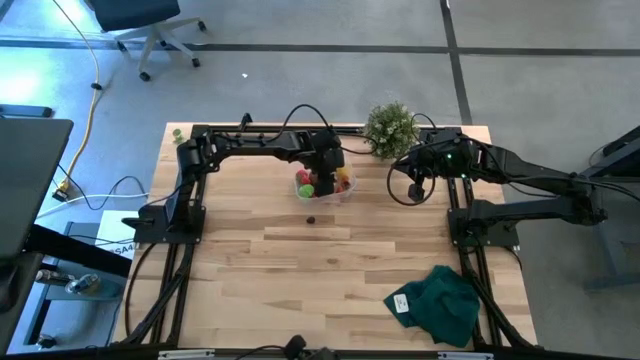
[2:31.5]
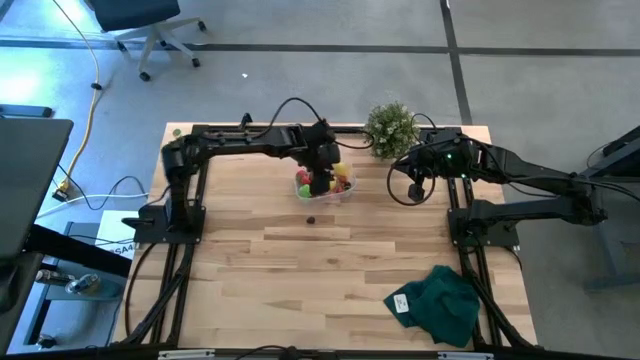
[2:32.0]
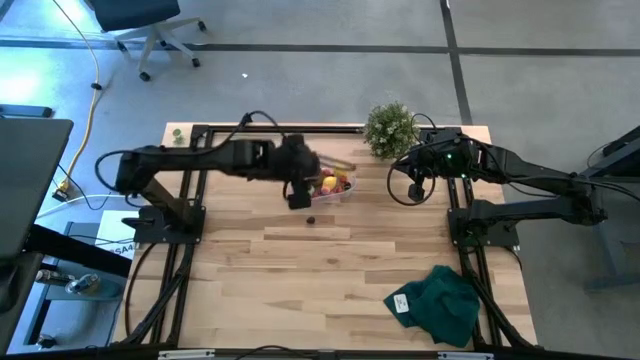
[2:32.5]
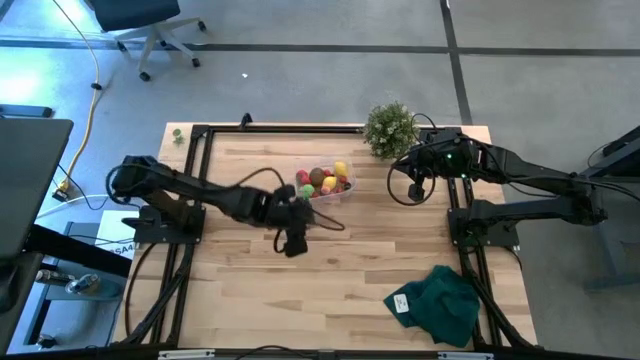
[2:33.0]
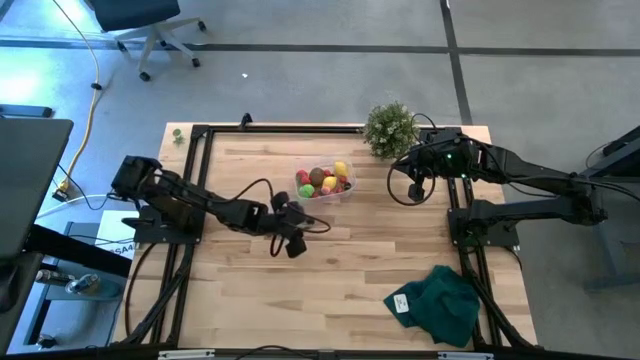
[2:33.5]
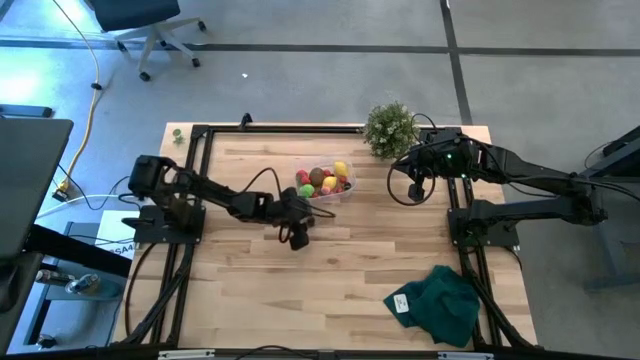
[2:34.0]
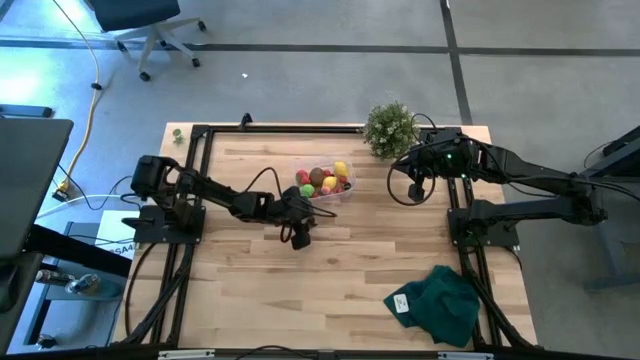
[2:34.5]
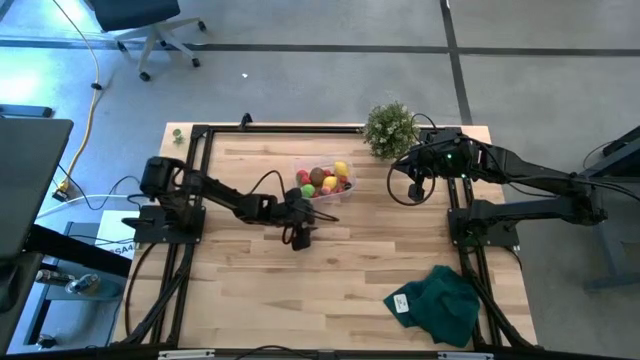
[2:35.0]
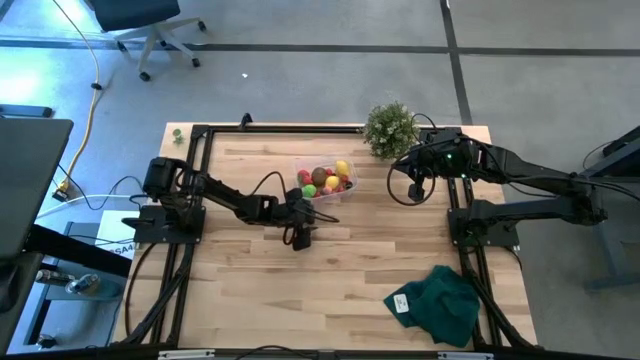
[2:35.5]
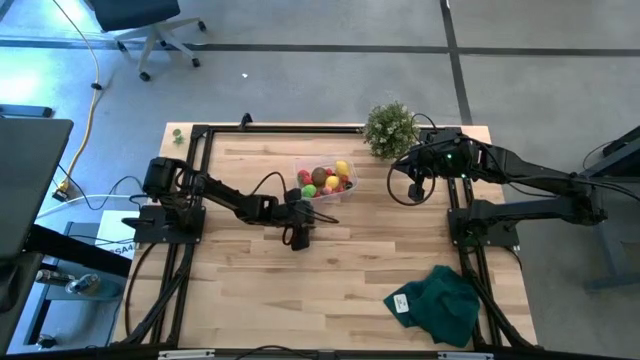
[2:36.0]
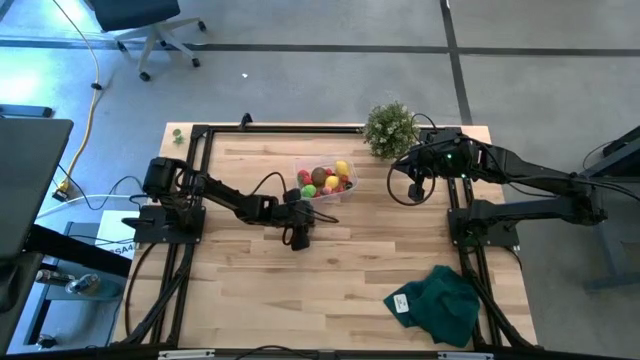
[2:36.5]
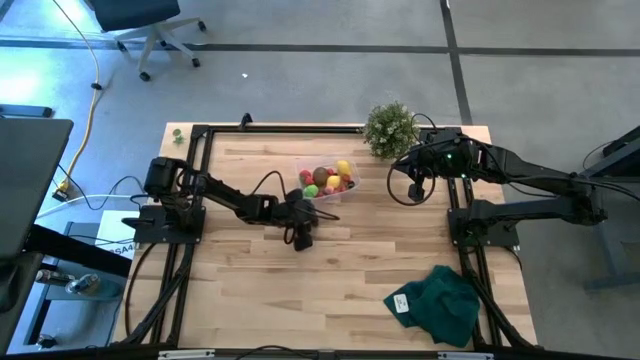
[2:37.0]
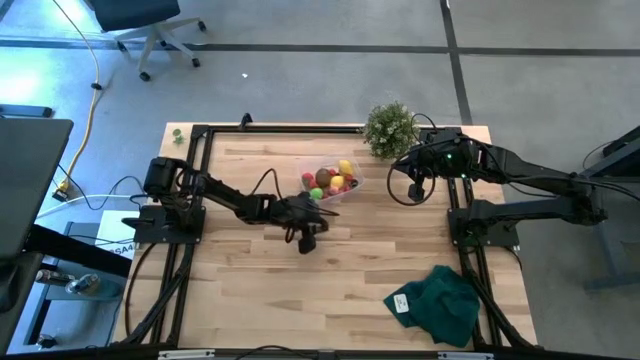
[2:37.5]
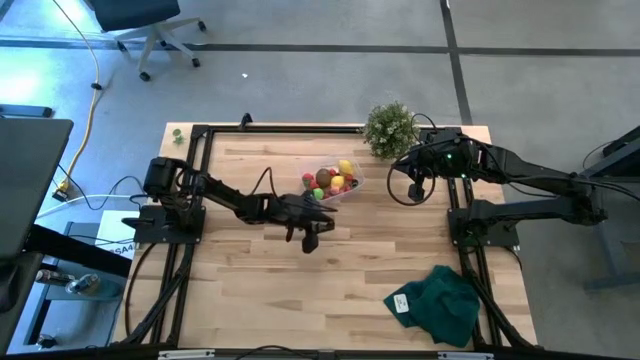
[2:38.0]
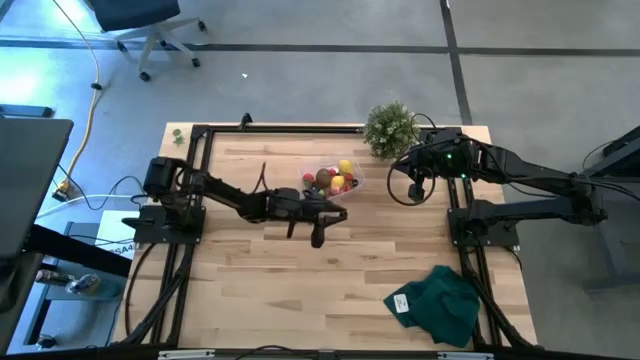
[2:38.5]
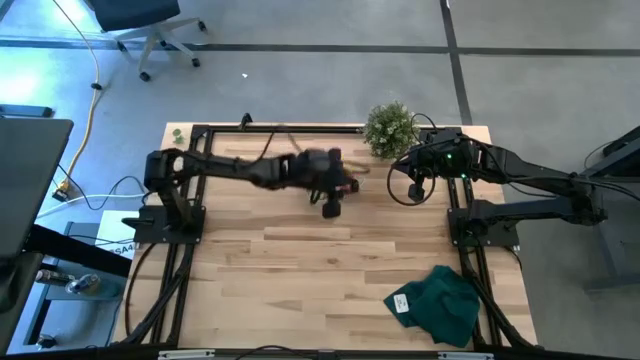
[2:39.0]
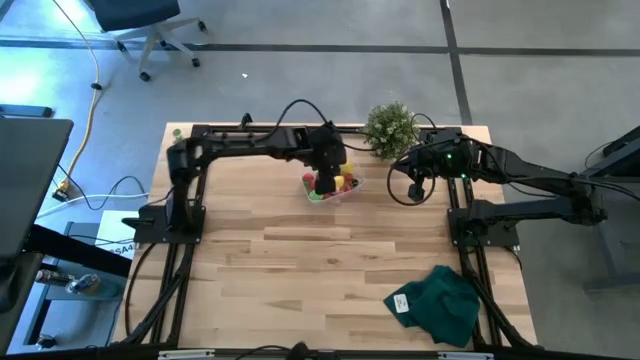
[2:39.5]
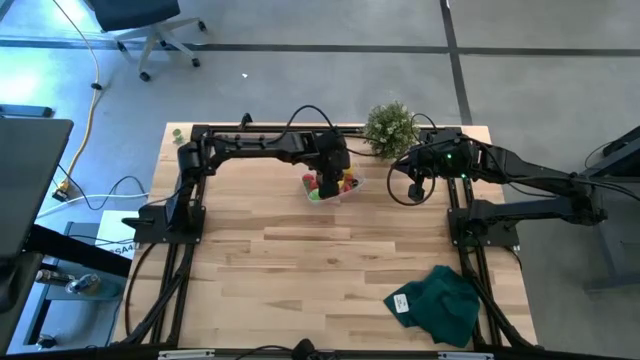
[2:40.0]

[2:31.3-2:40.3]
Task: Pick and placing Produce into tupperware
Put the blackberry into the transparent bin

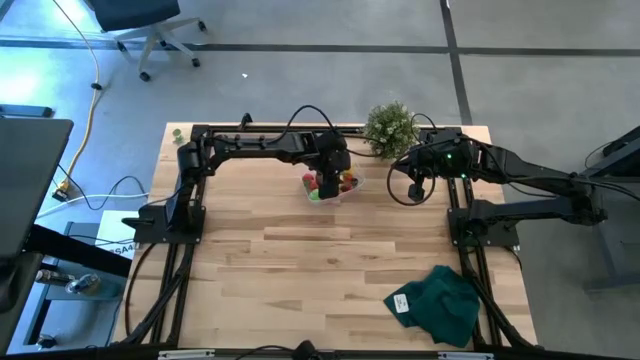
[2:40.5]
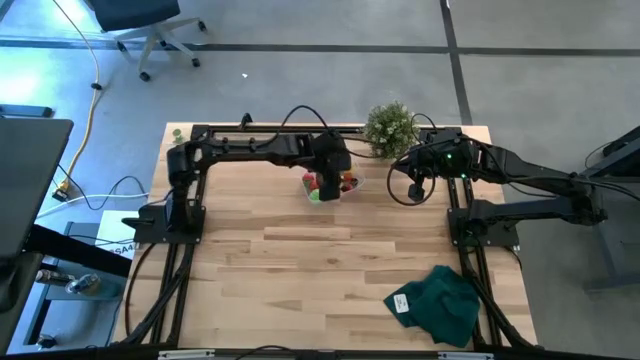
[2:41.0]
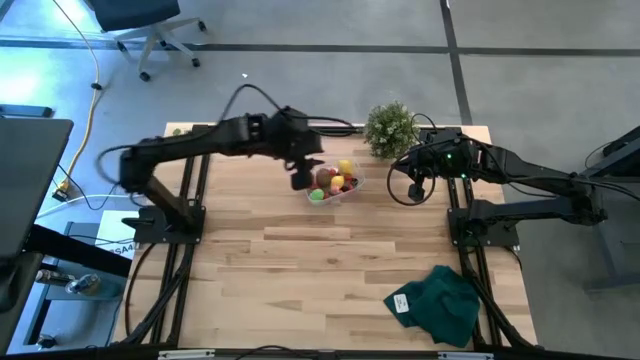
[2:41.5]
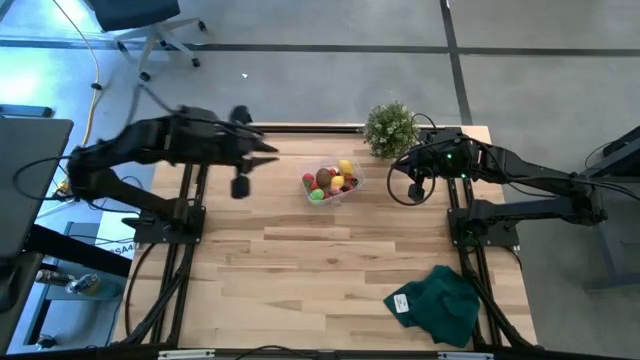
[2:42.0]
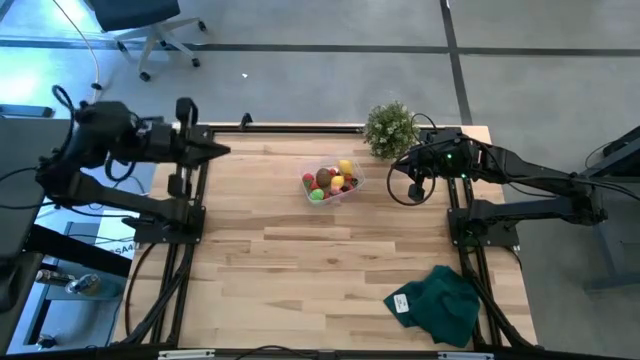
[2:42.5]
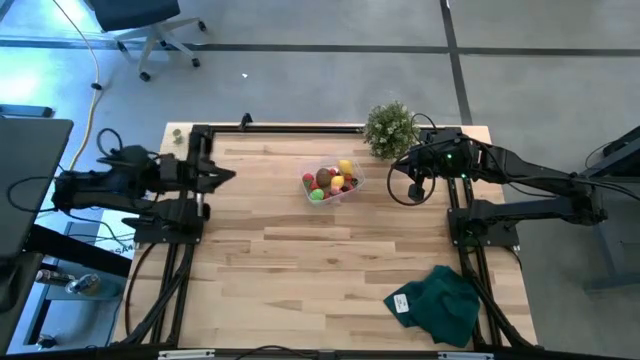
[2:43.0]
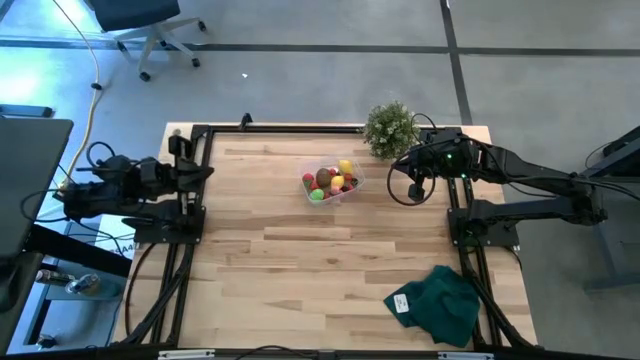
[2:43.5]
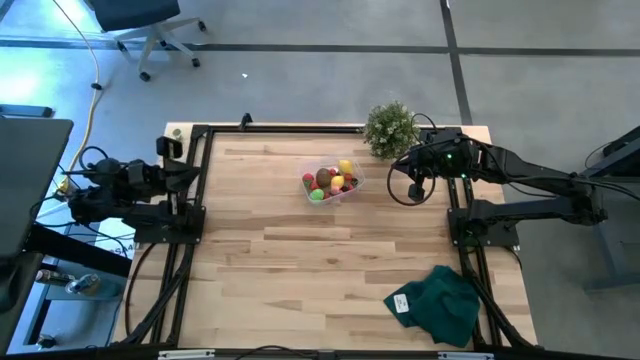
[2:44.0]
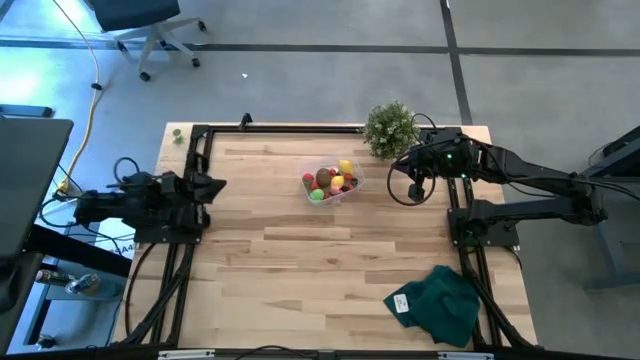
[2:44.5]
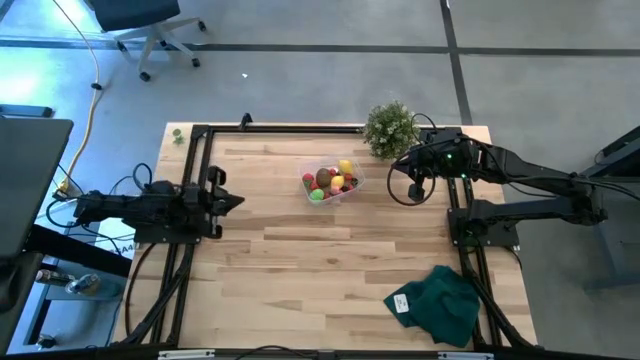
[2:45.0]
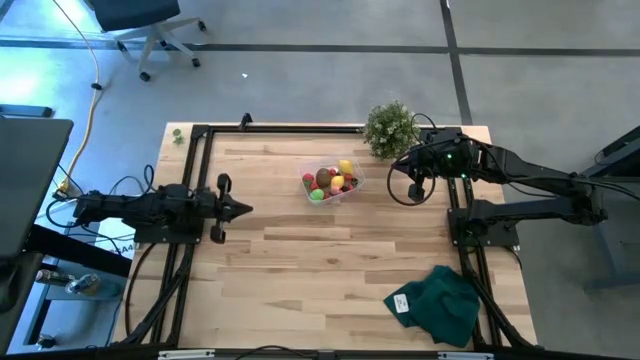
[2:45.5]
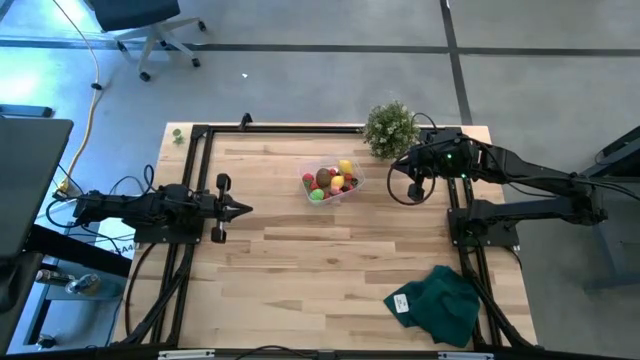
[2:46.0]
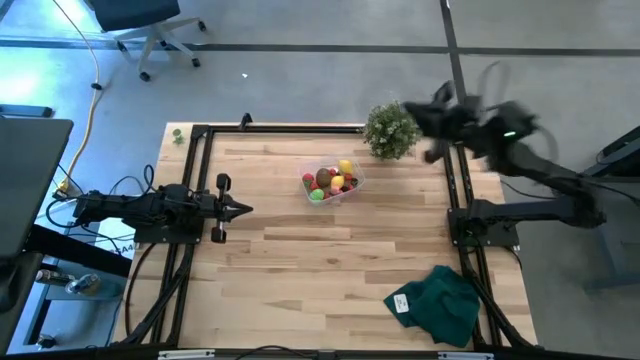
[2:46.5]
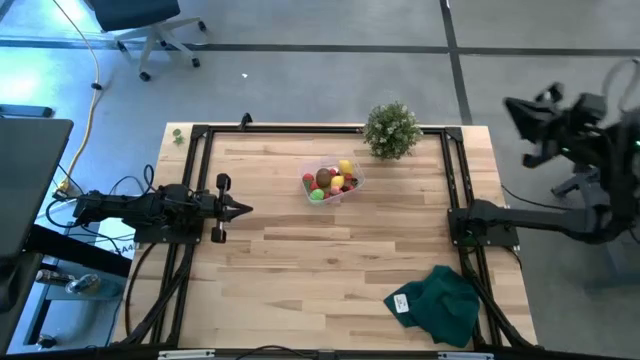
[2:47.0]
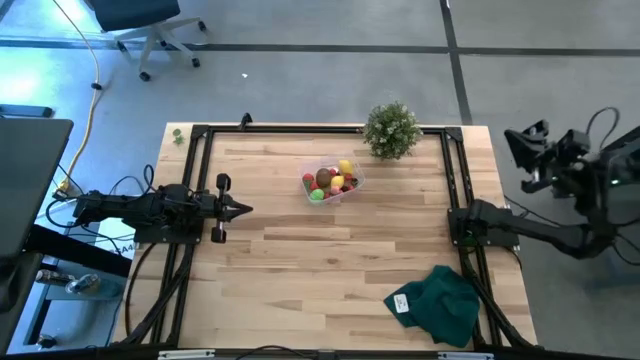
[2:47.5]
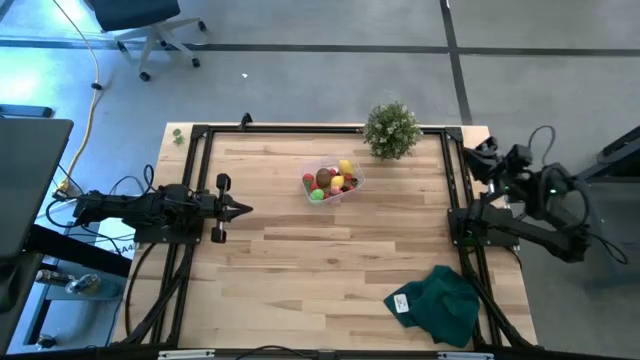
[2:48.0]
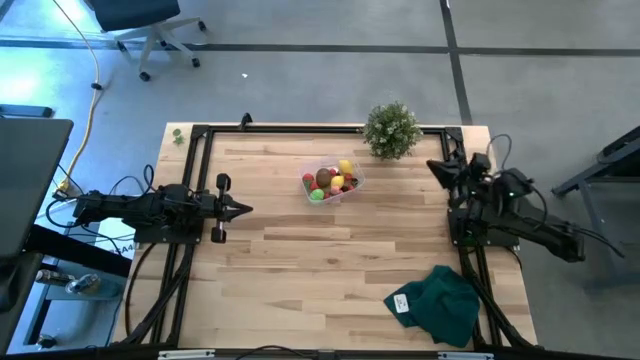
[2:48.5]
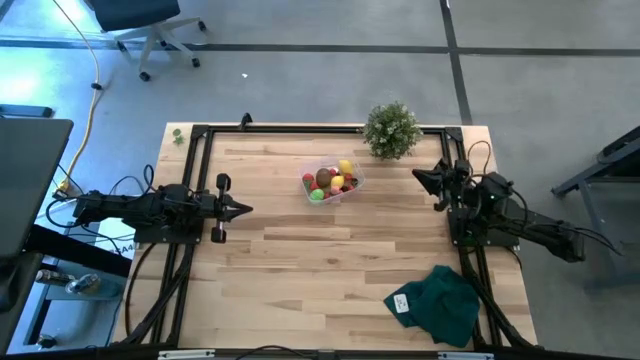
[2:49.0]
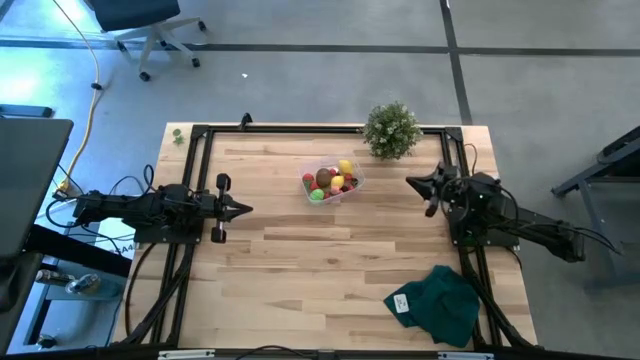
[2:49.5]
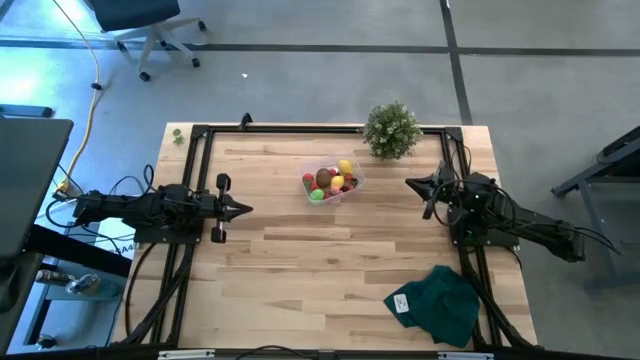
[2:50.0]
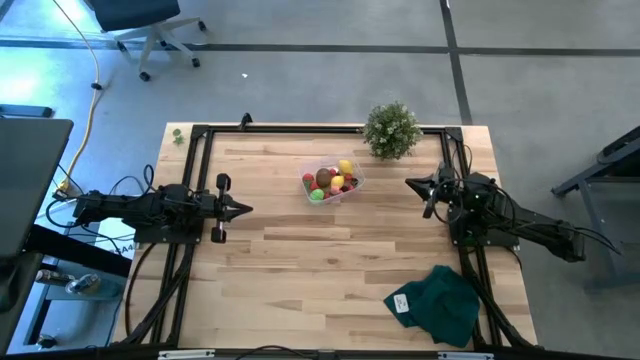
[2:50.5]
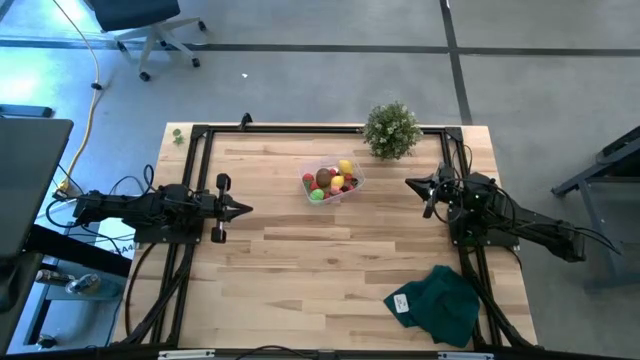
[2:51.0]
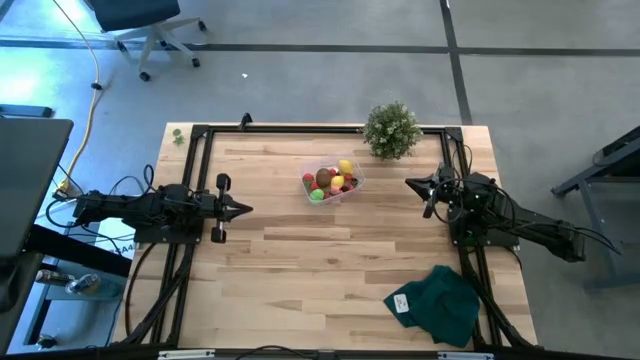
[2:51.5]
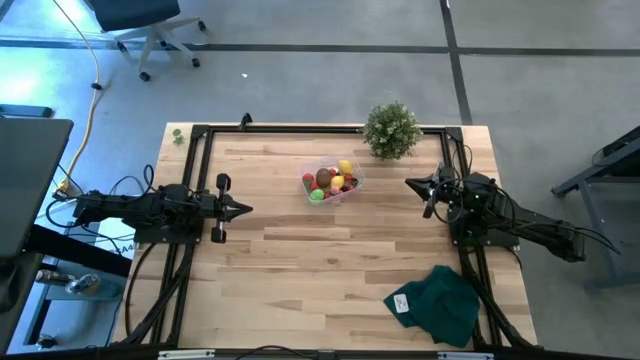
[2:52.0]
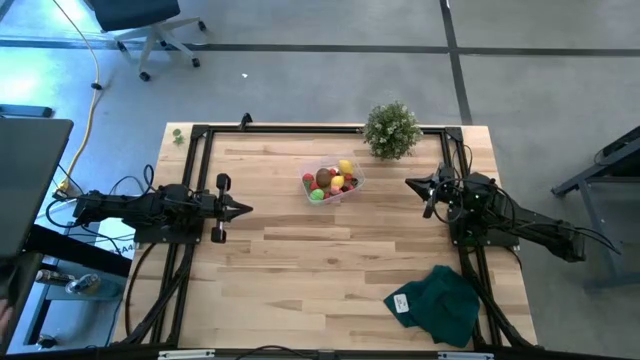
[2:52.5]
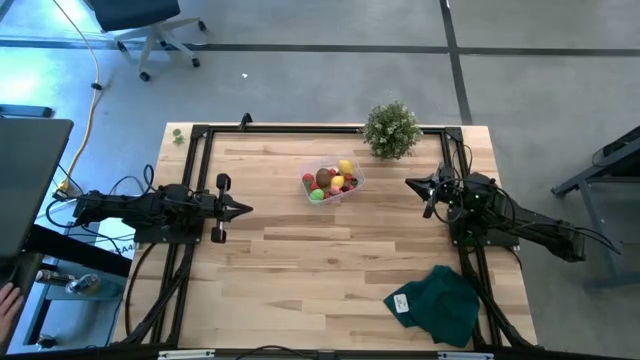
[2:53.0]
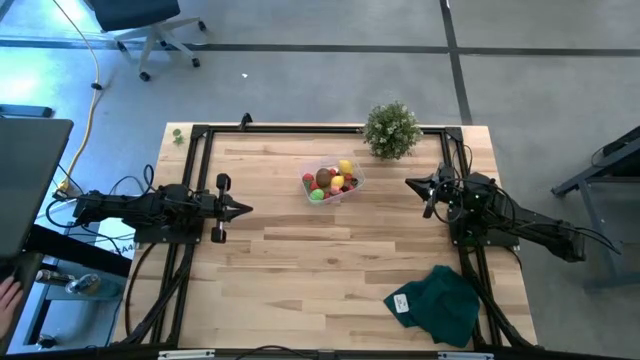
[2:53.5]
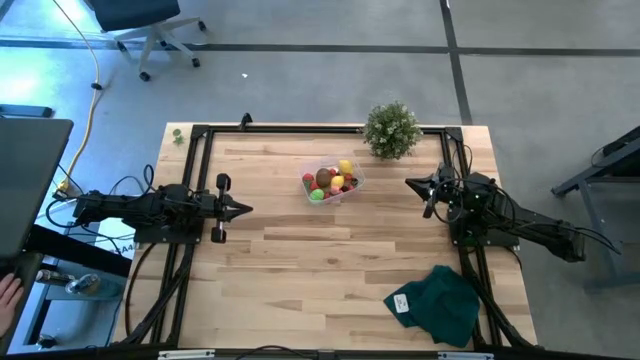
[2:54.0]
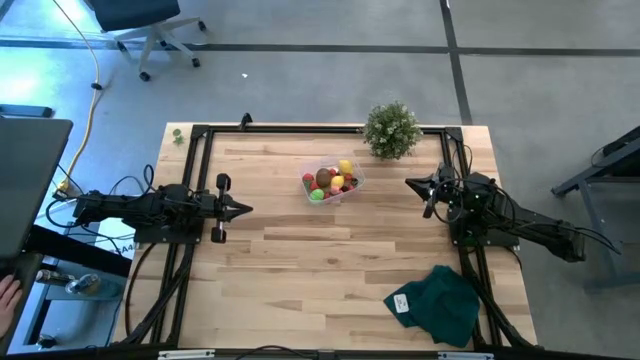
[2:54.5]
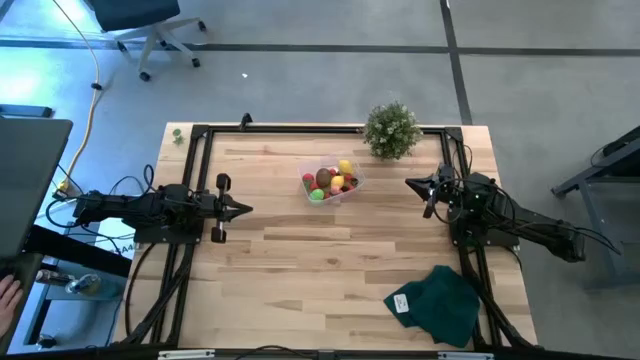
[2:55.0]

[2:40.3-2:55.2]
Return to Home Position
